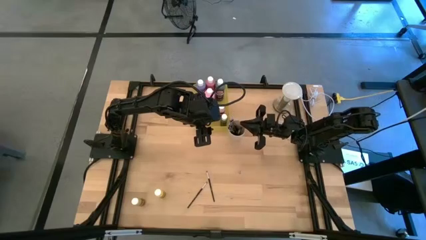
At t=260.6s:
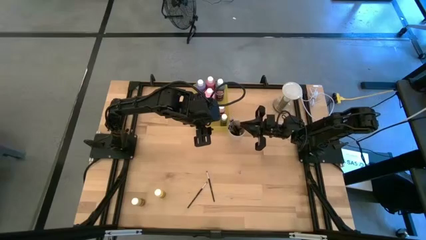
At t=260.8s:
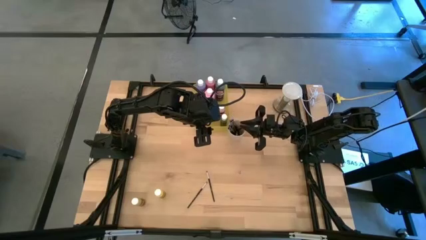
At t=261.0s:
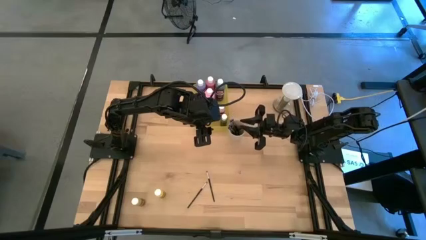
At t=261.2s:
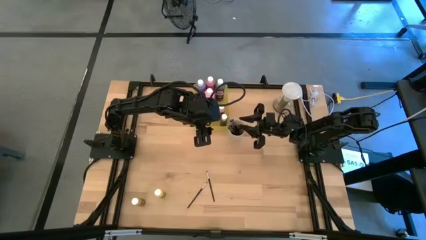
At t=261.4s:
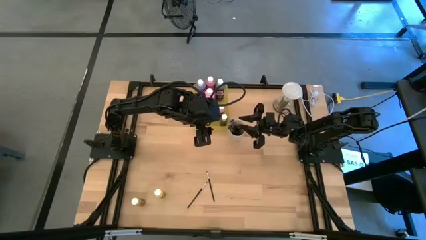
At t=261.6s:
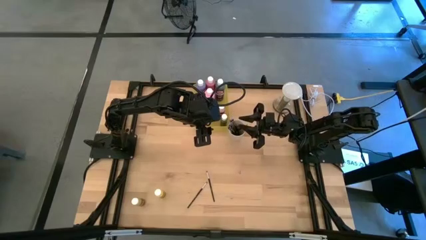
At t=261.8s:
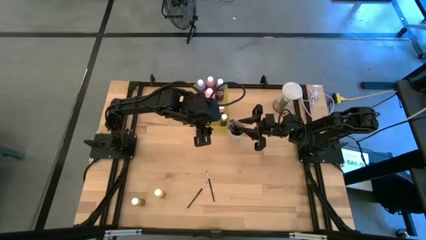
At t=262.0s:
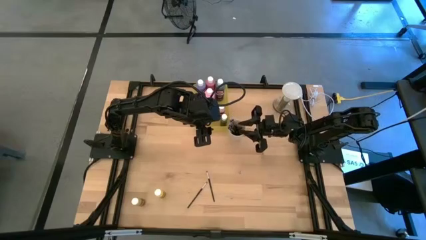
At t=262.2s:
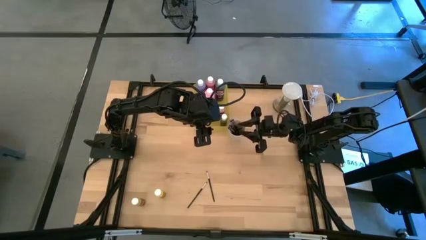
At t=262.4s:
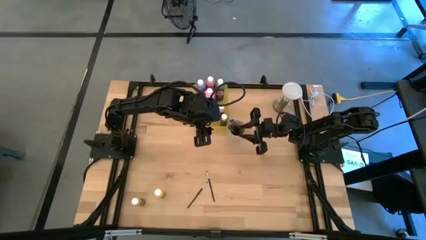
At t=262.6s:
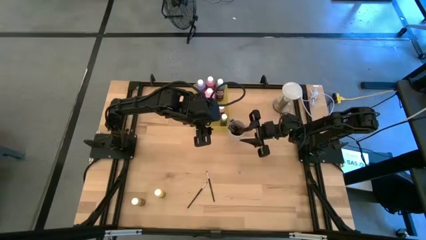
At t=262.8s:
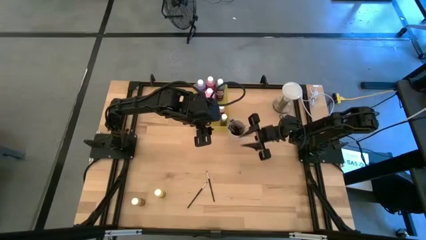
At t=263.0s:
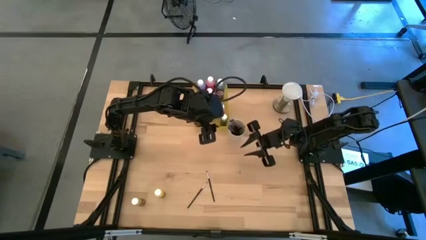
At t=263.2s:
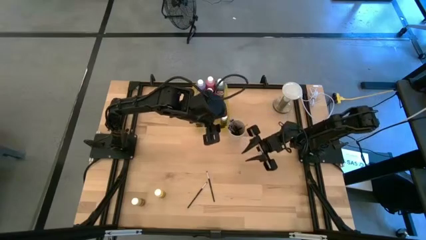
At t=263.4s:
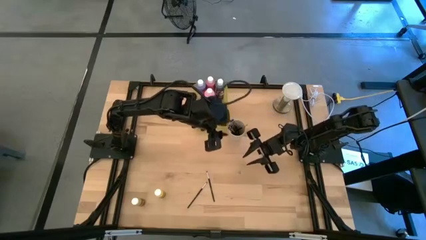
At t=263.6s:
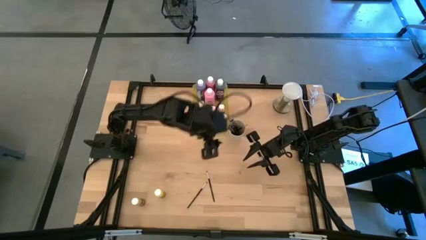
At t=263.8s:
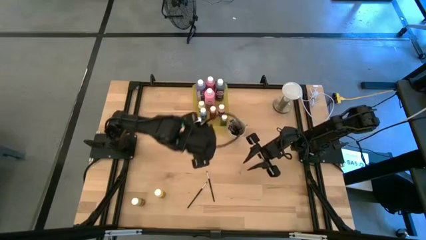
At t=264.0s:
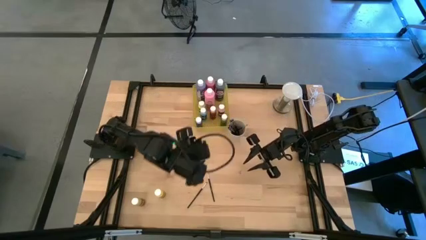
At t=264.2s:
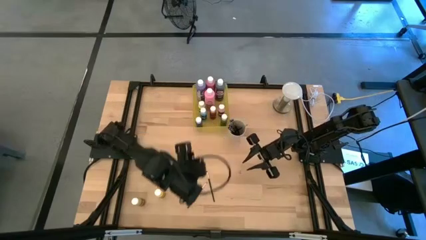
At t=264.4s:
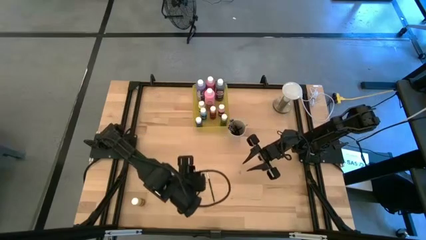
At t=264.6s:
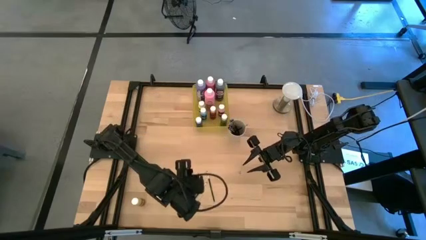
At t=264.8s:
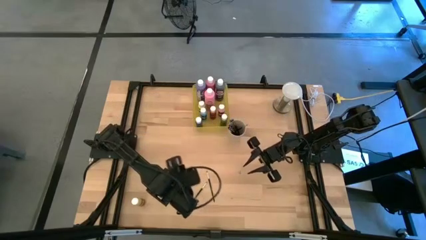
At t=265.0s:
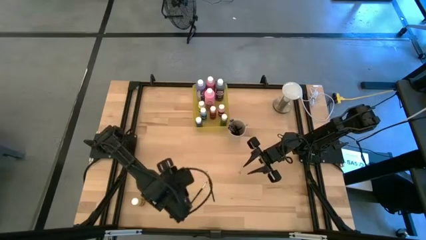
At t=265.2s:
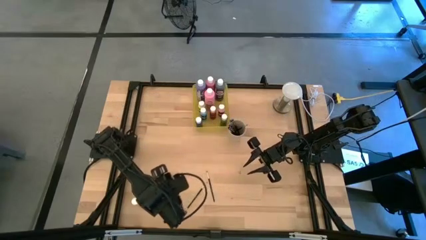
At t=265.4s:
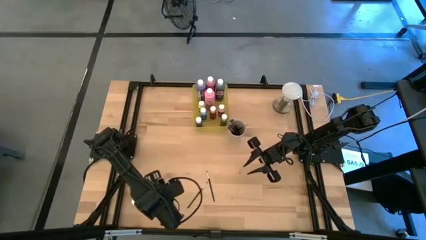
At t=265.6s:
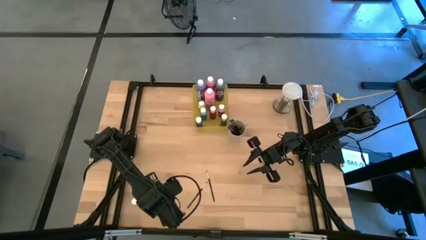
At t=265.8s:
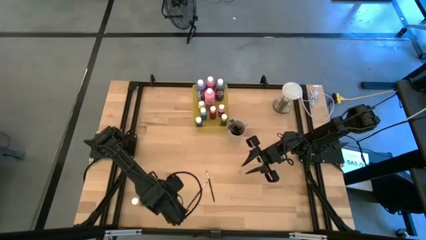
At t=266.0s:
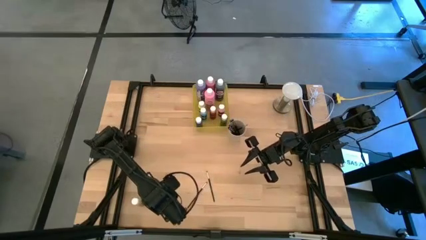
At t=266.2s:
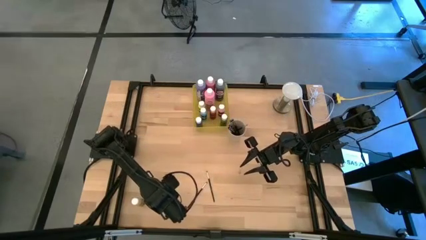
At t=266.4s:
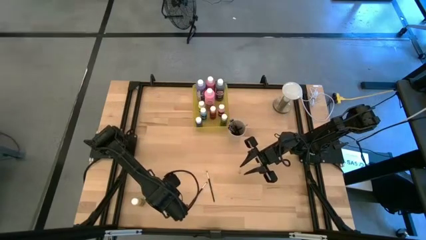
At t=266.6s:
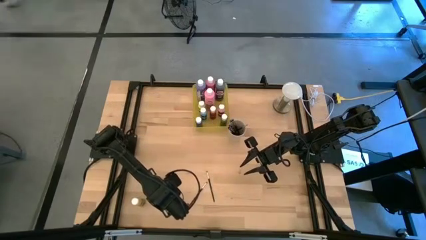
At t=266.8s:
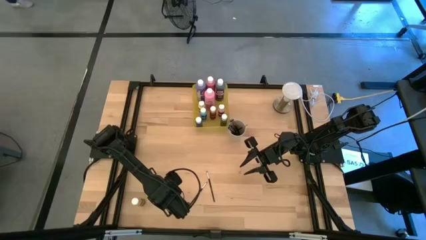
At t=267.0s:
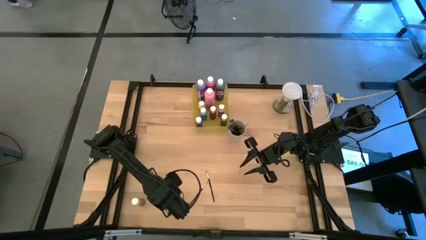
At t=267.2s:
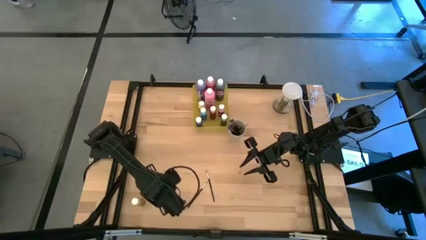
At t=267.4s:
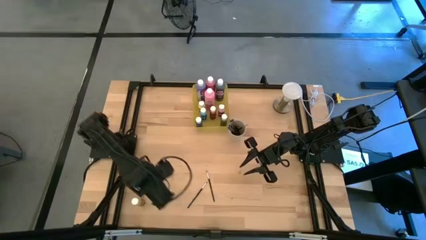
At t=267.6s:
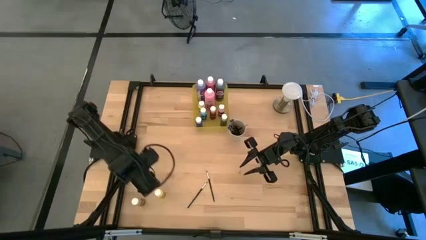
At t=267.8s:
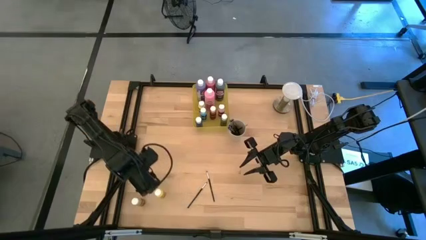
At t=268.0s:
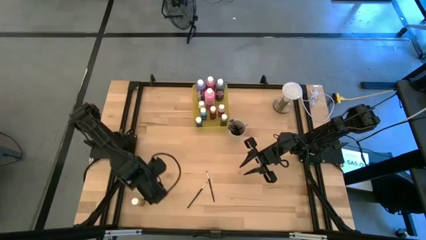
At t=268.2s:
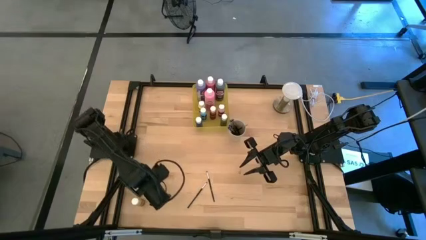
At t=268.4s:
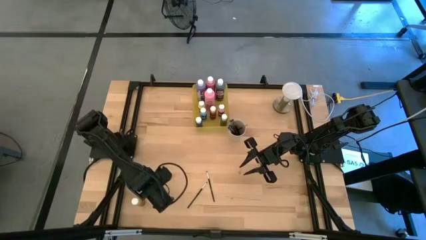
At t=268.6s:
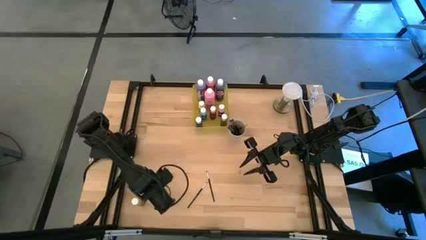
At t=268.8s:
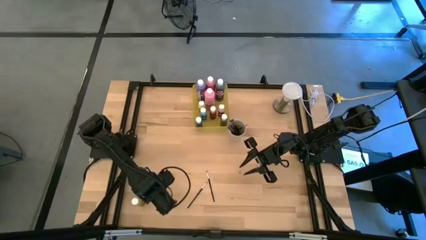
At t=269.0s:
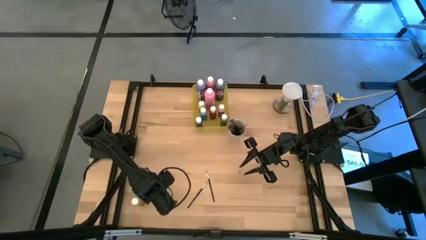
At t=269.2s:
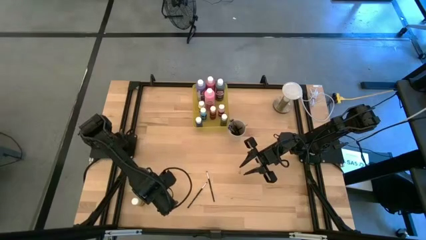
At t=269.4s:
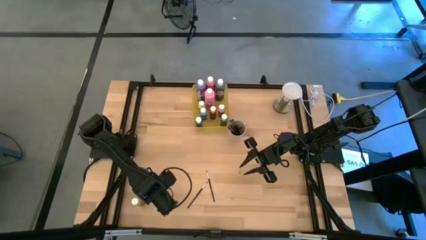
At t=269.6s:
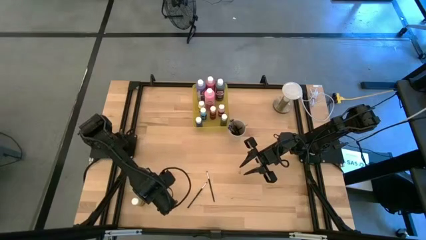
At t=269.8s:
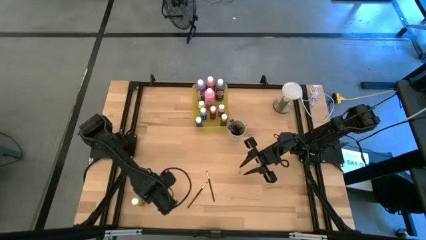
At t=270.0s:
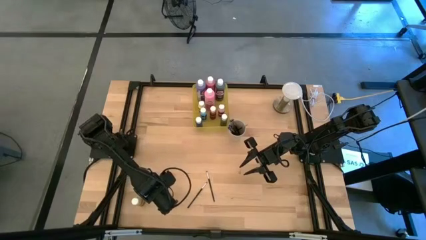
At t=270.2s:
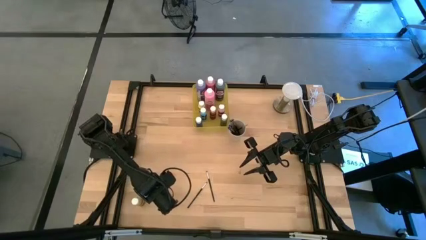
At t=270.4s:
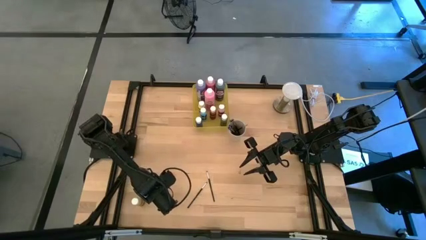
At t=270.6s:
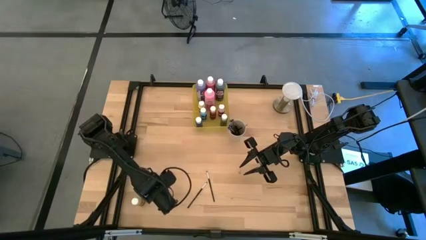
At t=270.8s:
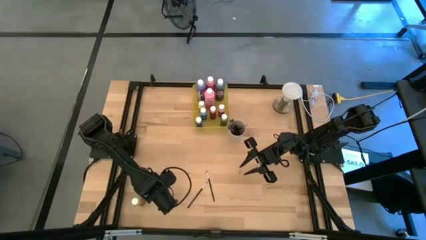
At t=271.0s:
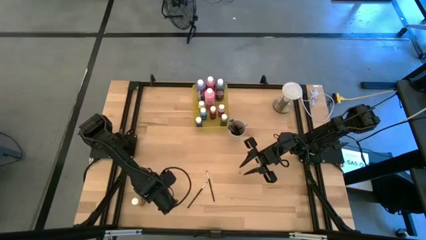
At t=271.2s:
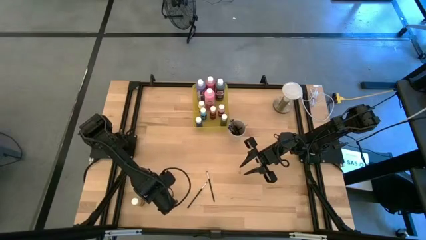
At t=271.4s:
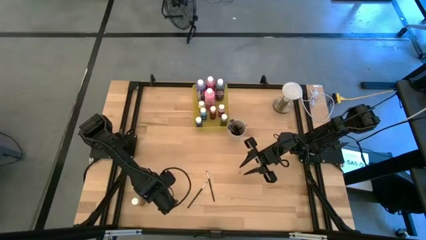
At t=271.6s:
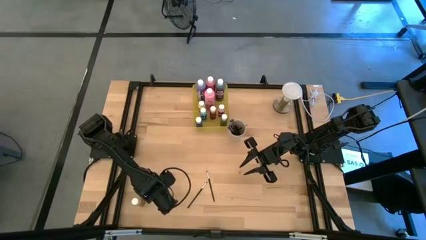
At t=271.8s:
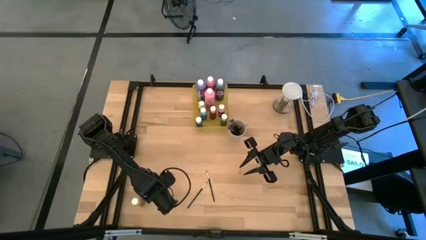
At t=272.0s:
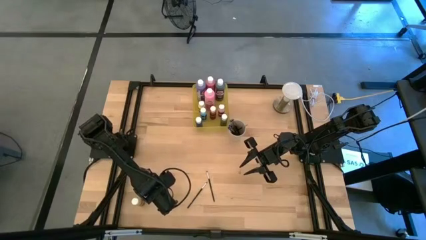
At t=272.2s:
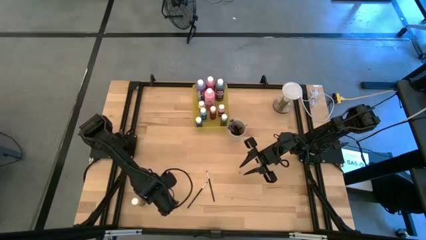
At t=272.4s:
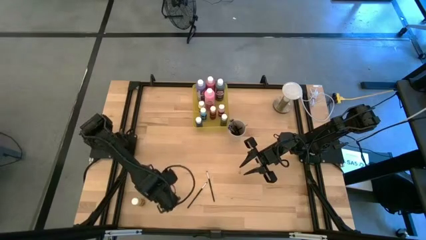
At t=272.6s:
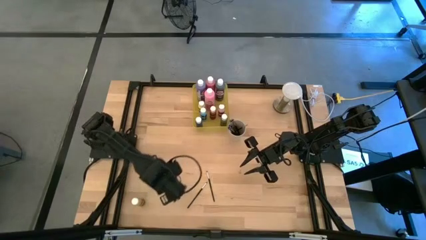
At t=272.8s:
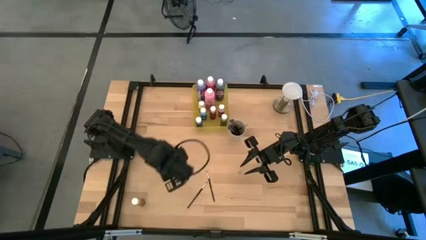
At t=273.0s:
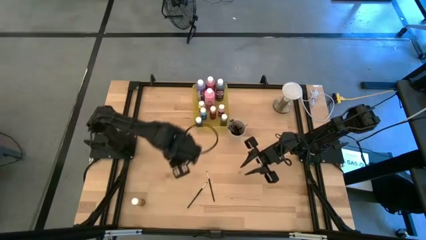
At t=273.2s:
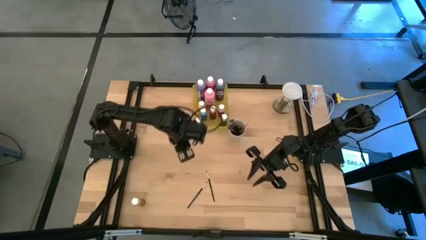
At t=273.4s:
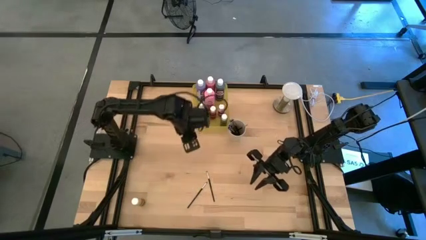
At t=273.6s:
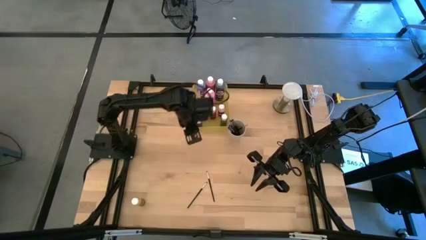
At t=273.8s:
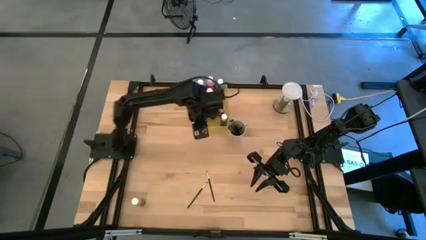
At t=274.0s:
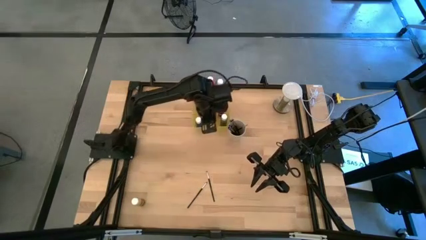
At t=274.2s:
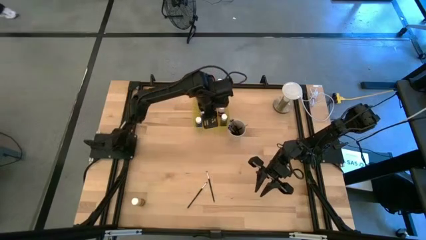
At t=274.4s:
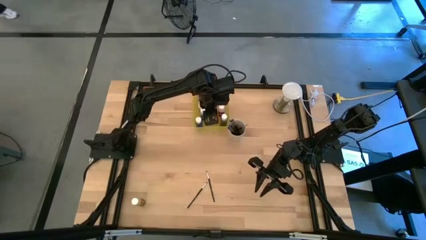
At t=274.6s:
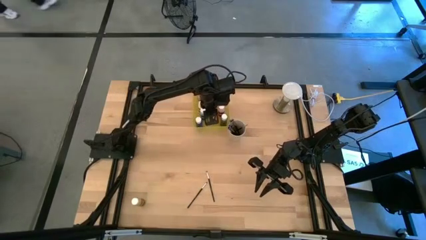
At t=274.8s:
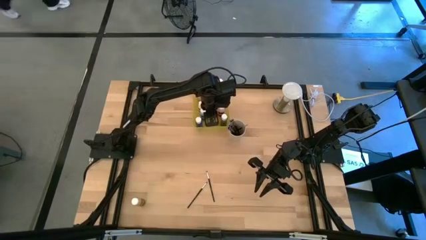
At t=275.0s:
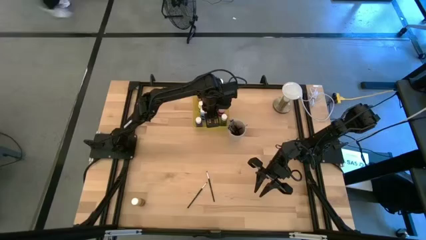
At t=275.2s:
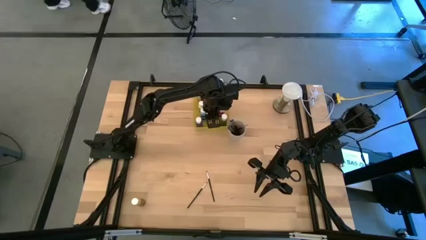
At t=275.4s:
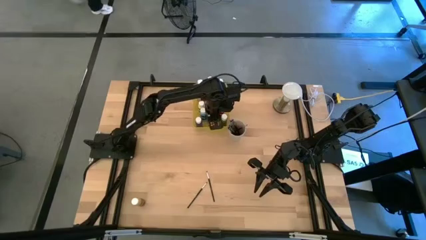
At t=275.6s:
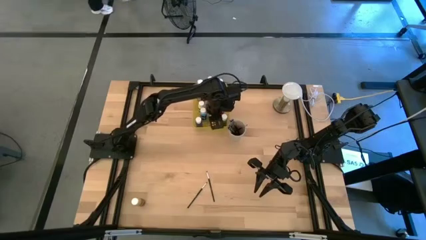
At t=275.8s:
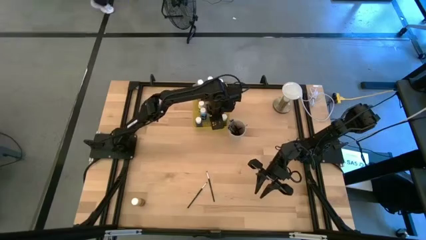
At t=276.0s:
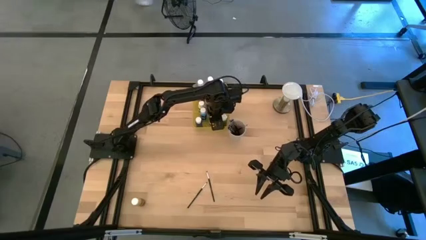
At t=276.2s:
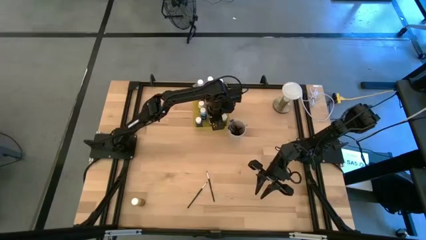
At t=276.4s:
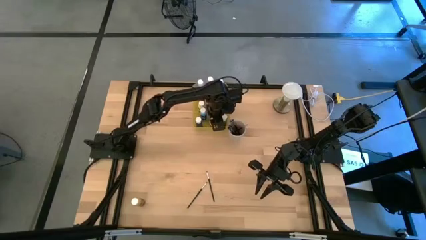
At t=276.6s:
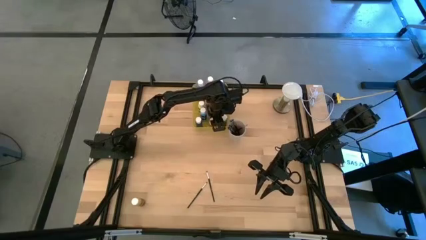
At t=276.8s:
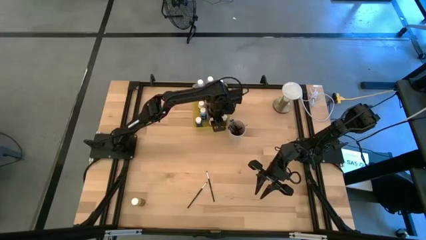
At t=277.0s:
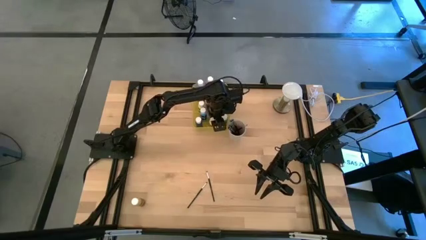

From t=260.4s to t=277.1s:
Task: Pick & Place Paint Supplies
Put the small yellow paint bottle into the yellow bin
